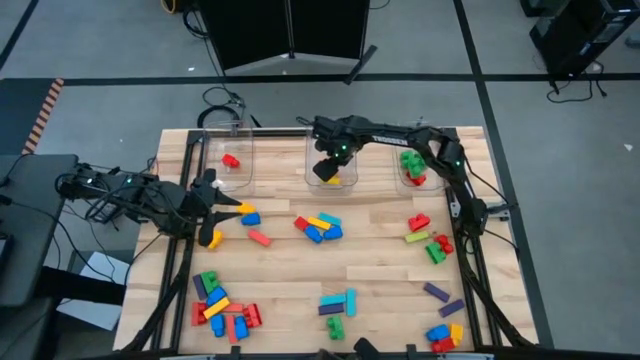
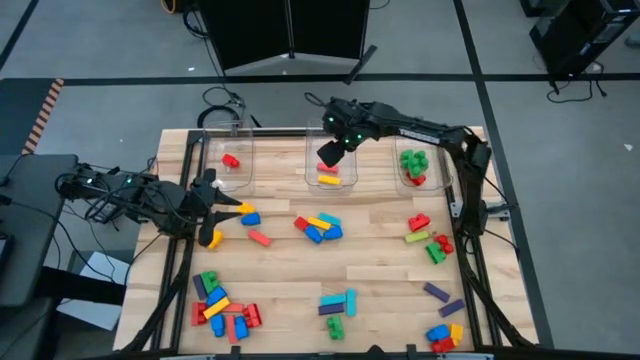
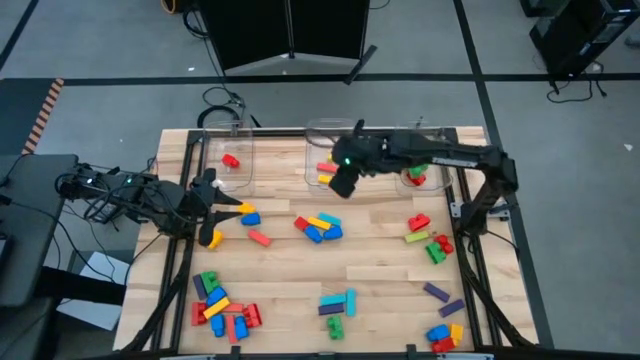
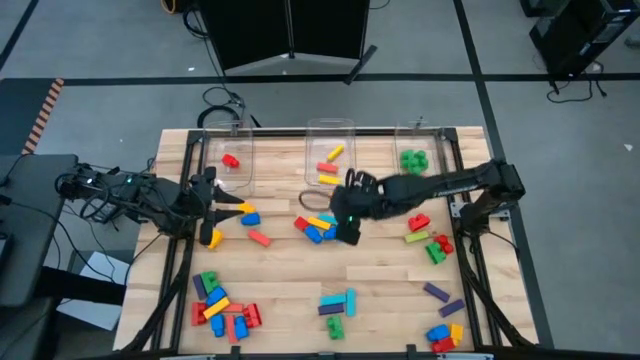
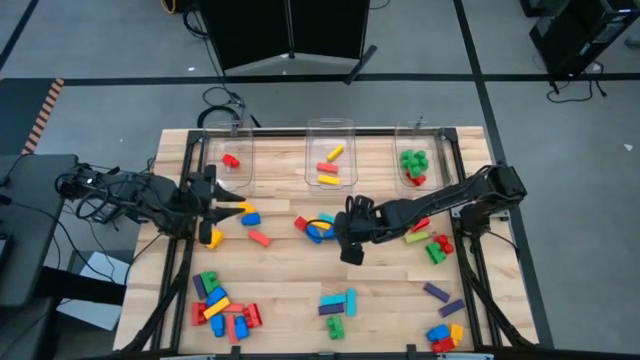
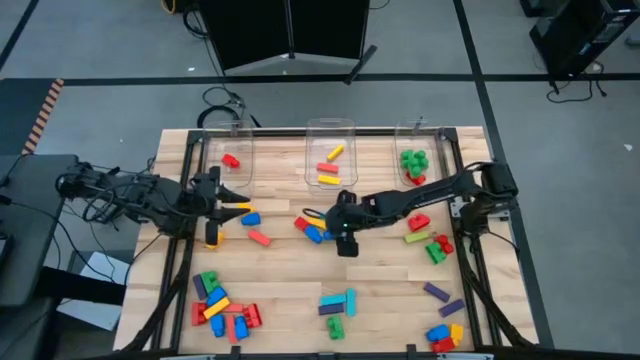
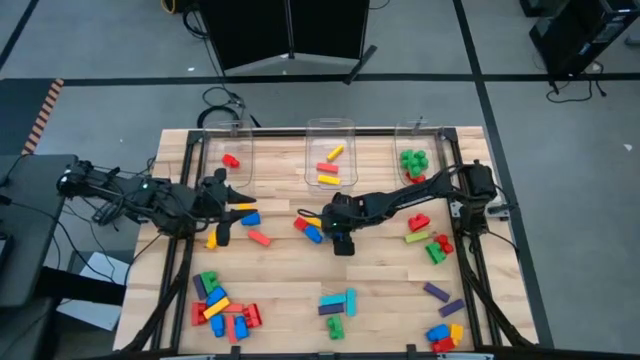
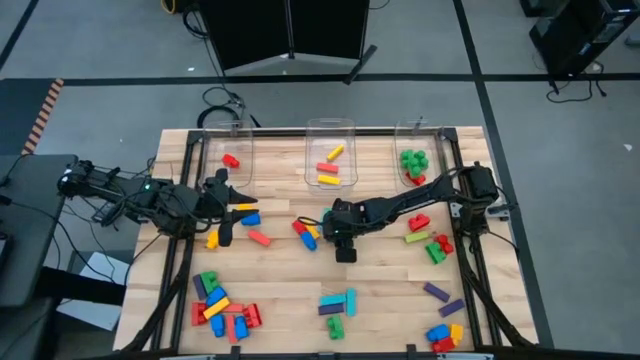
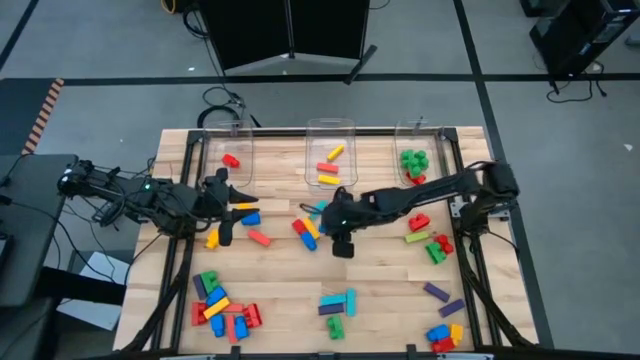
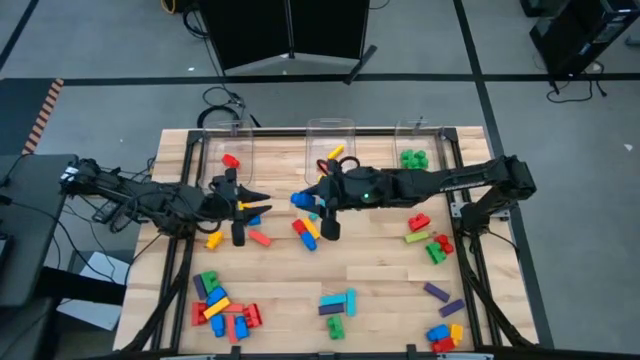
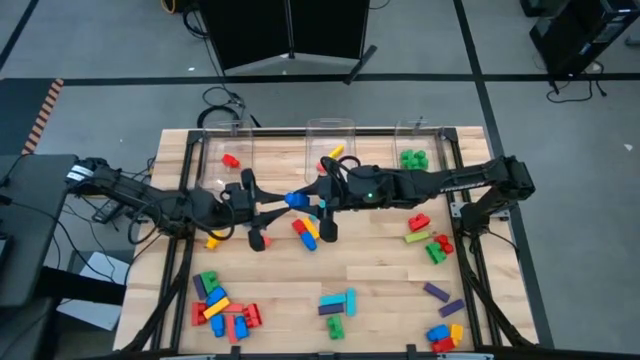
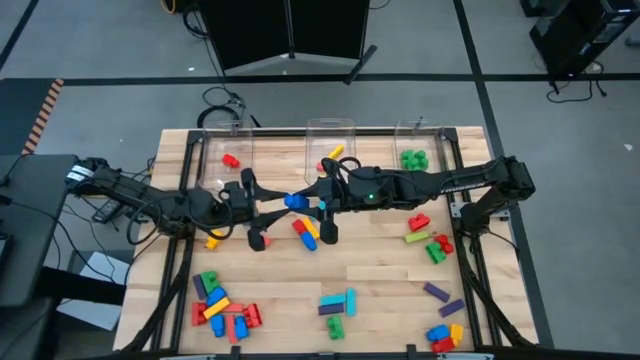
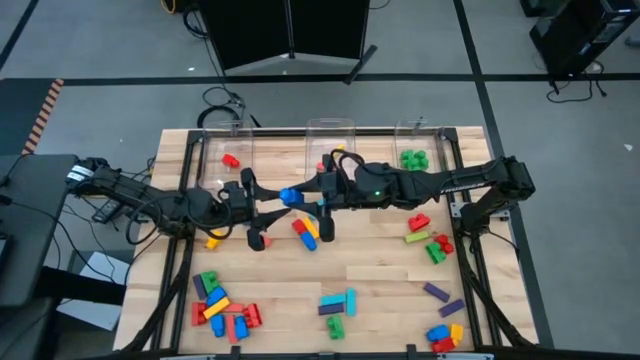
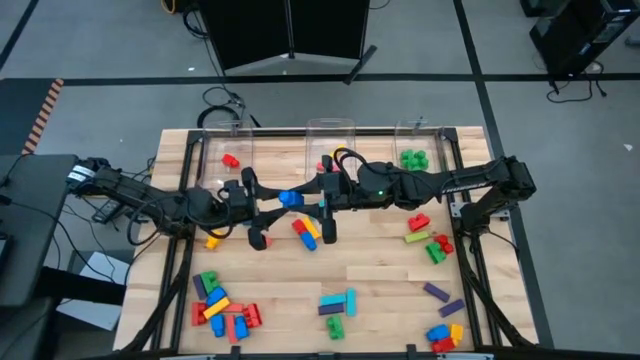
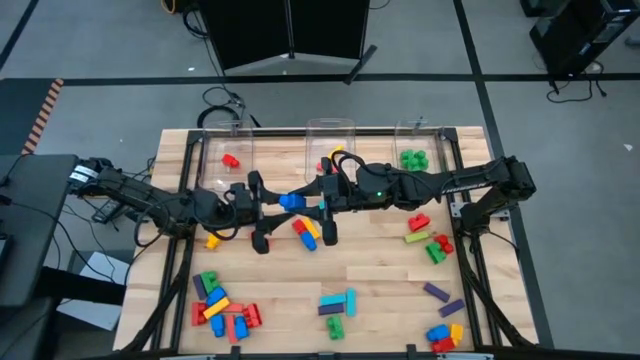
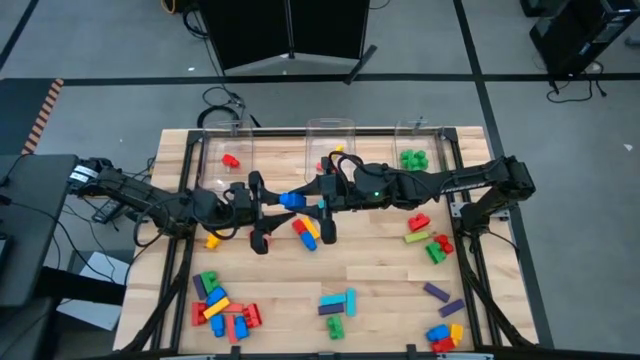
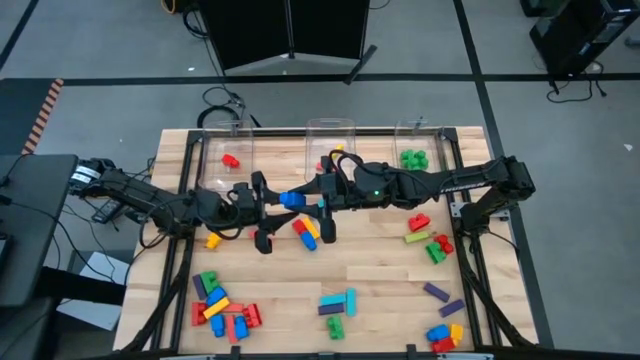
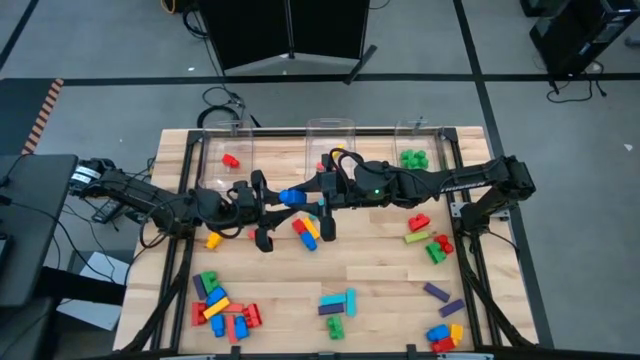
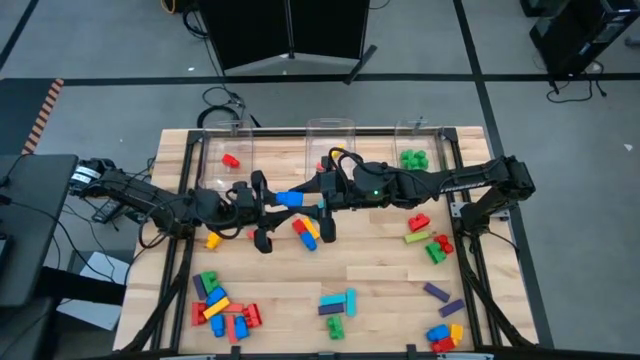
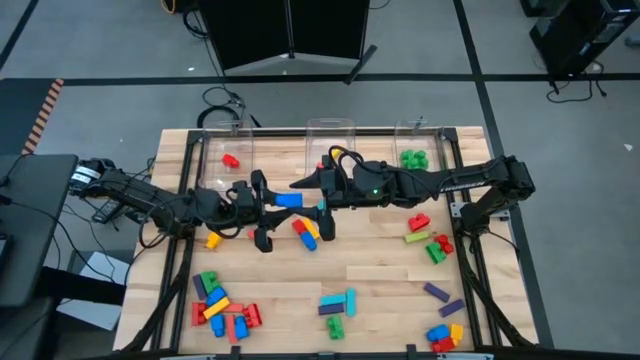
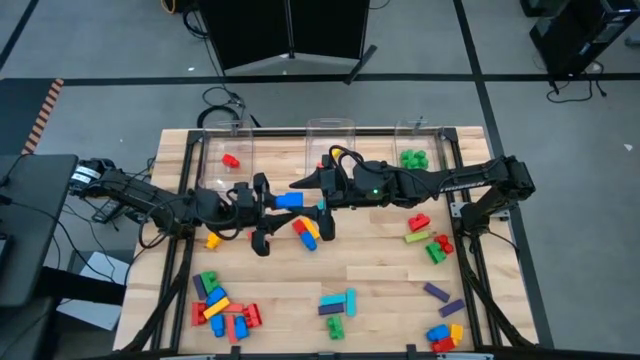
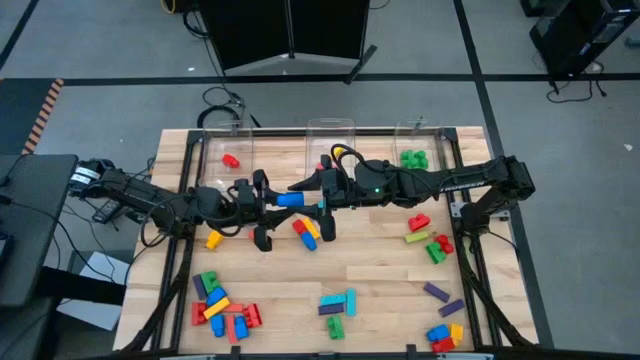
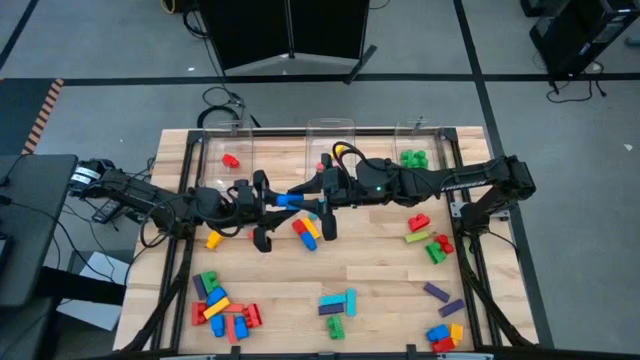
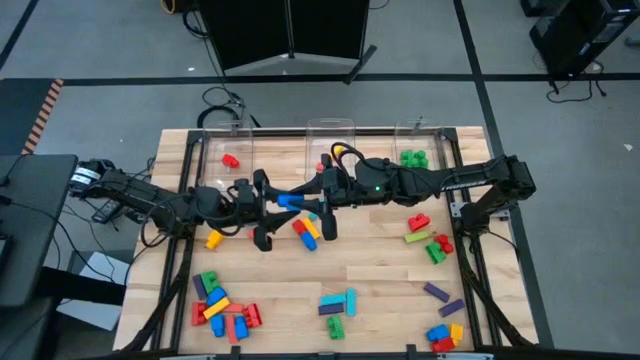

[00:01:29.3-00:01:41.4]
Task: Sort blocks by size
Put the blue 1 stud game piece into the left transparent bin

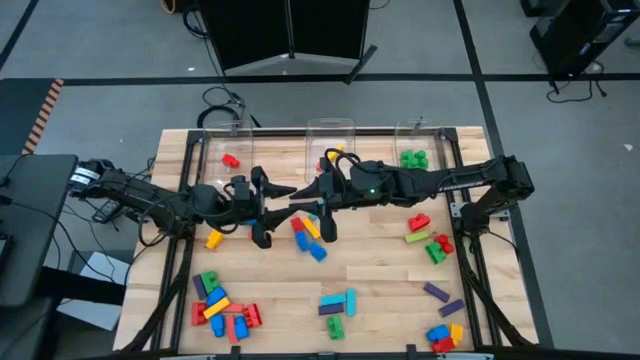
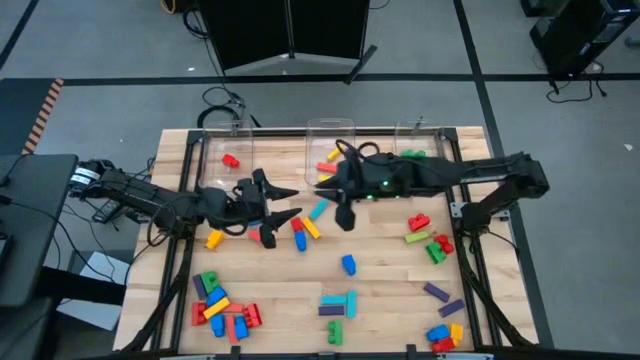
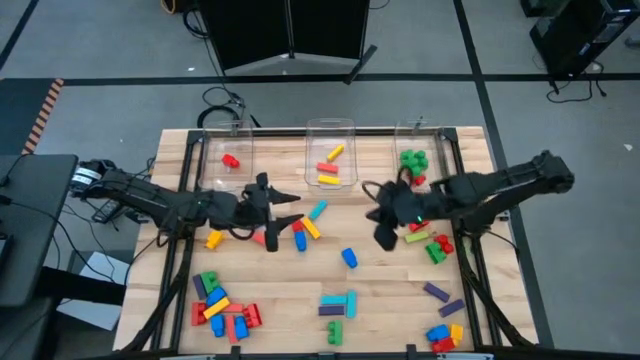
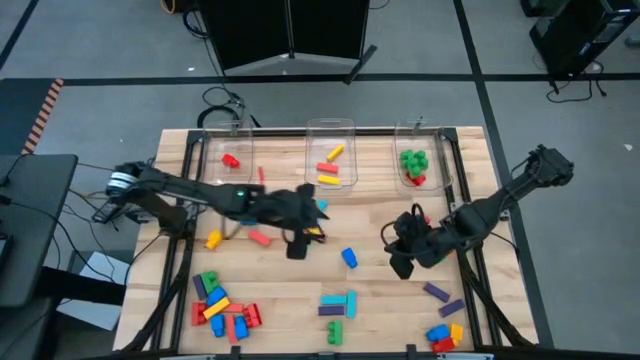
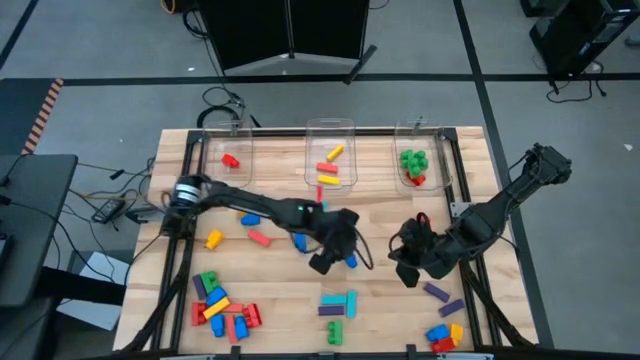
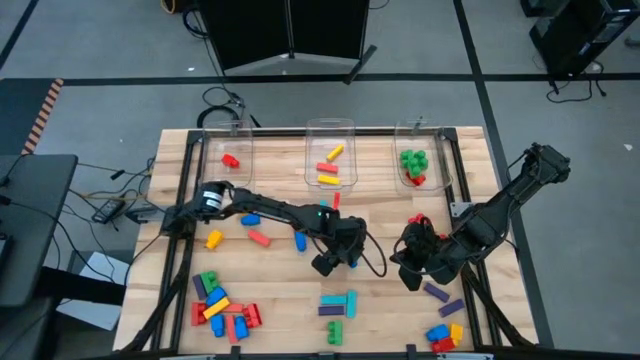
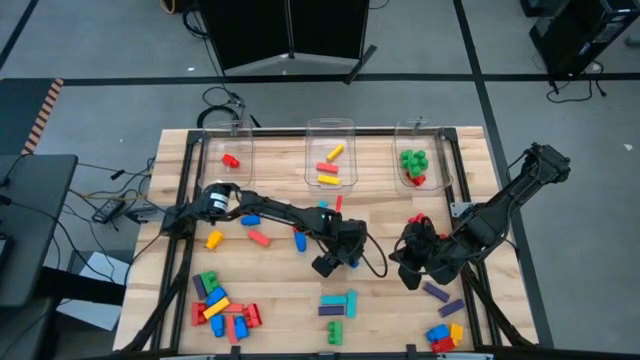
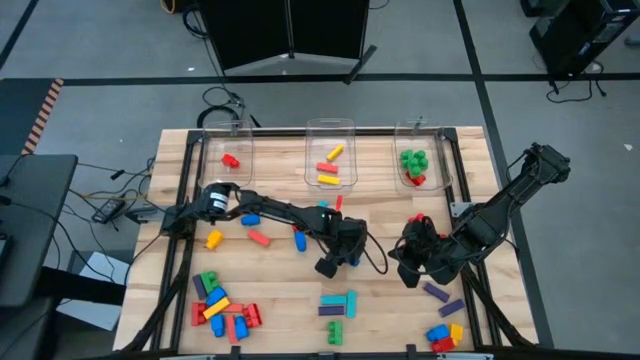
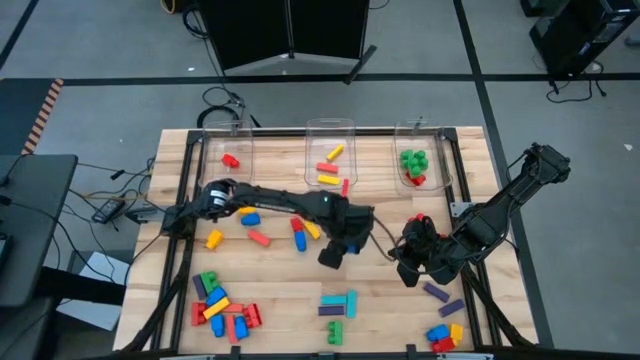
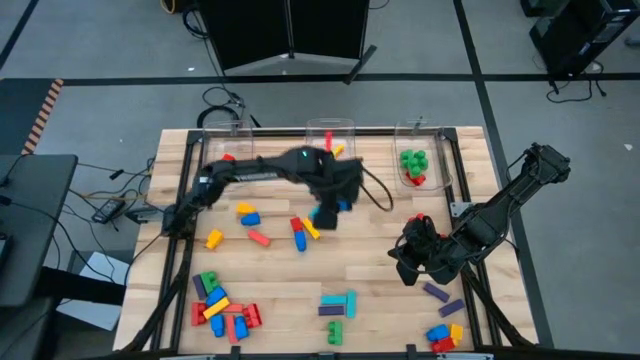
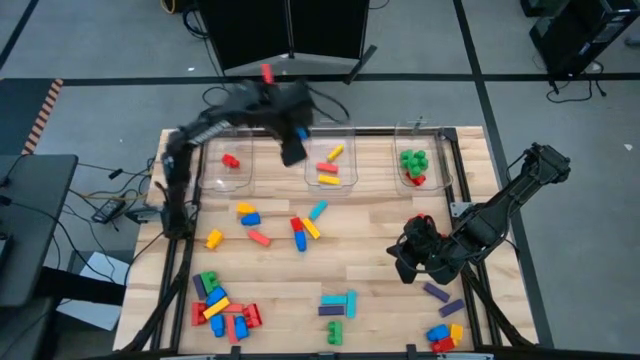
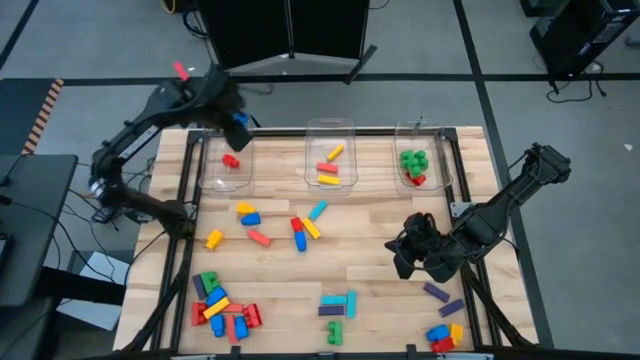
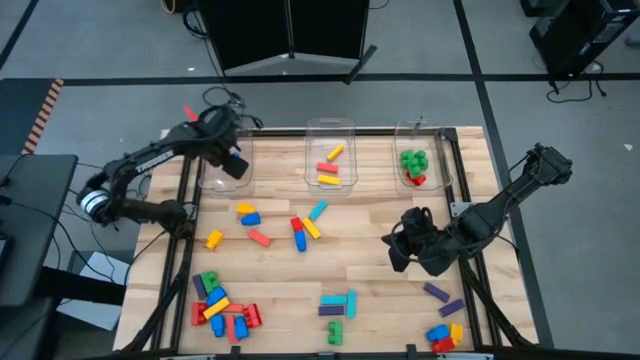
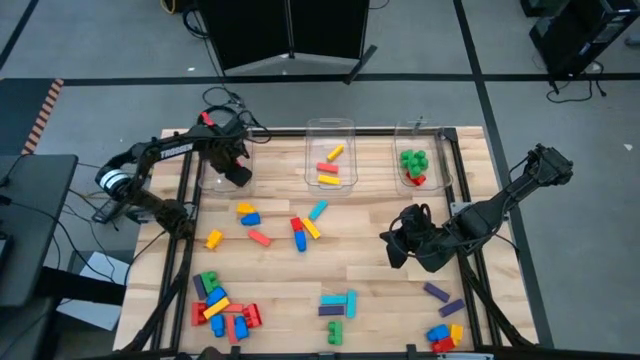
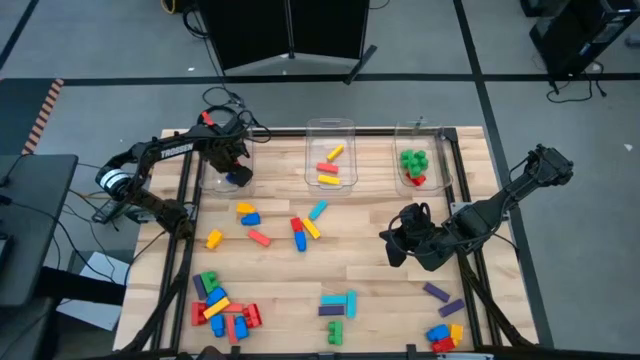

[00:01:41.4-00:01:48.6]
Put the blue 1 stud game piece into the left transparent bin
